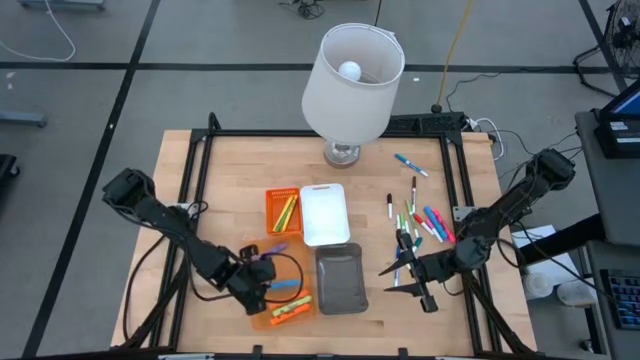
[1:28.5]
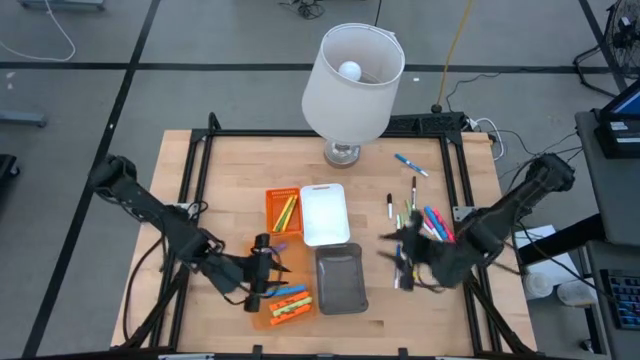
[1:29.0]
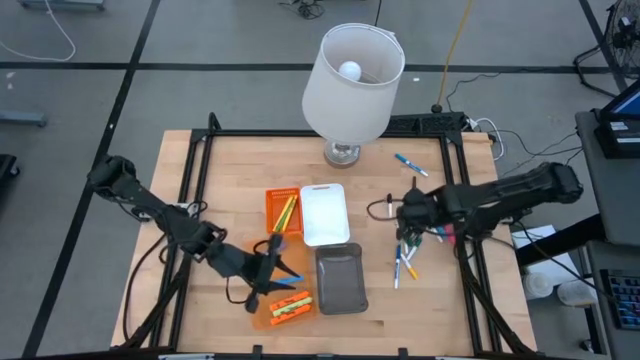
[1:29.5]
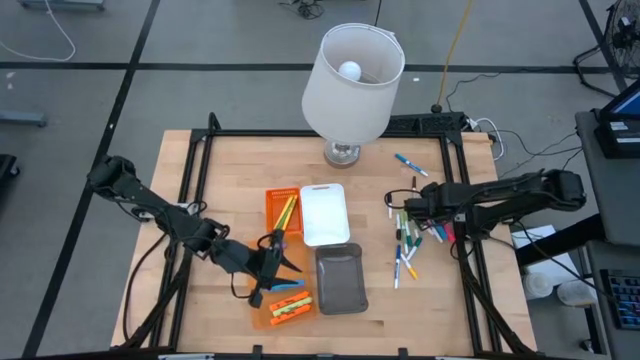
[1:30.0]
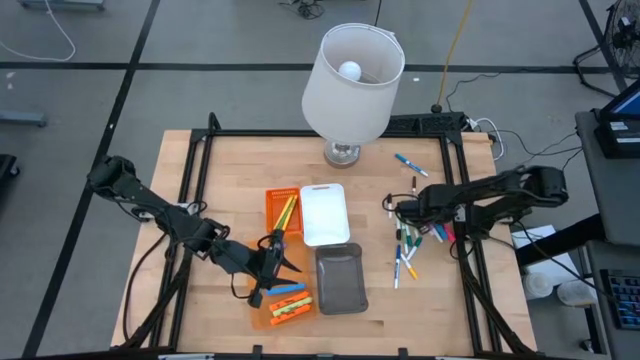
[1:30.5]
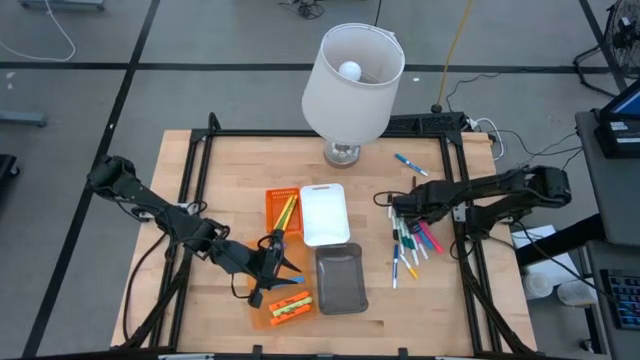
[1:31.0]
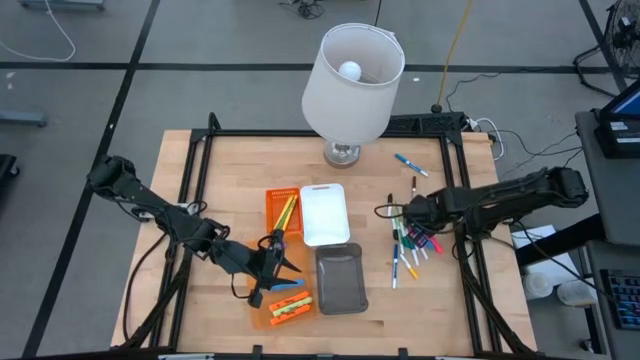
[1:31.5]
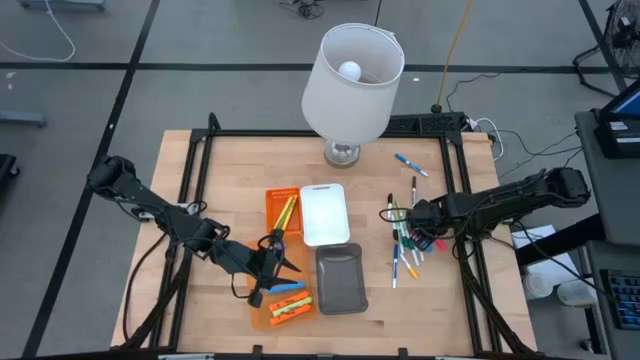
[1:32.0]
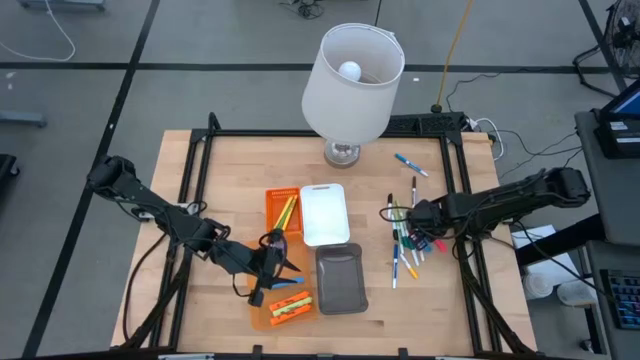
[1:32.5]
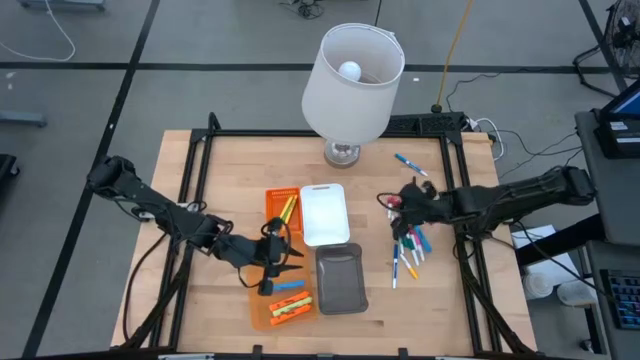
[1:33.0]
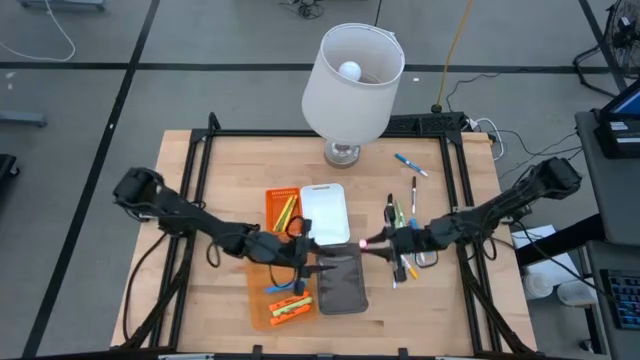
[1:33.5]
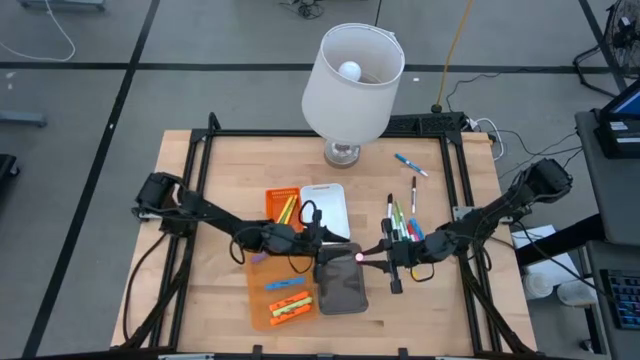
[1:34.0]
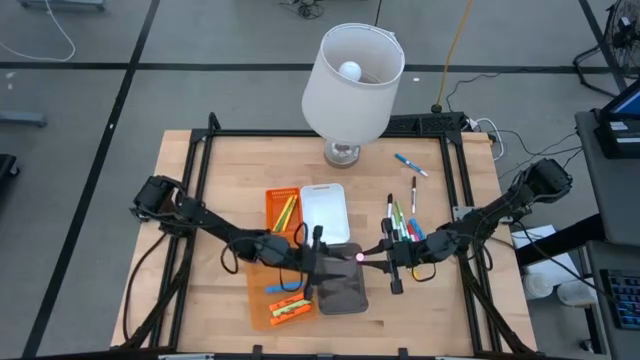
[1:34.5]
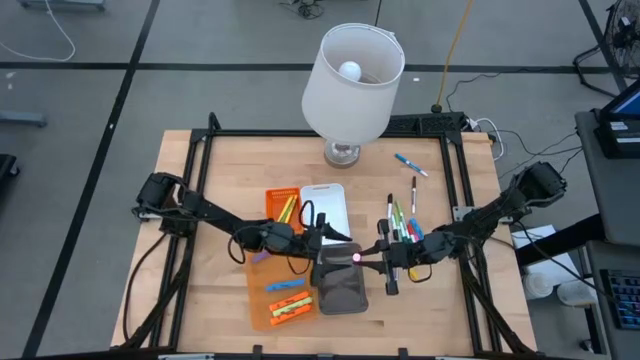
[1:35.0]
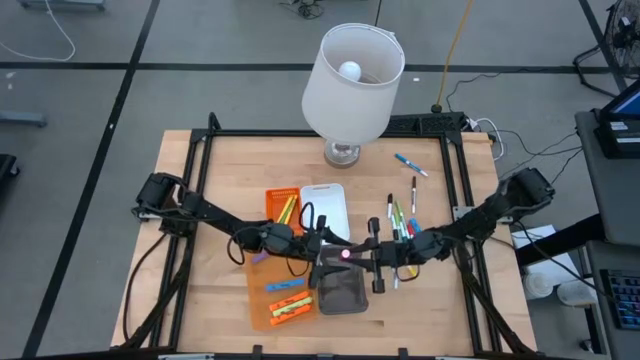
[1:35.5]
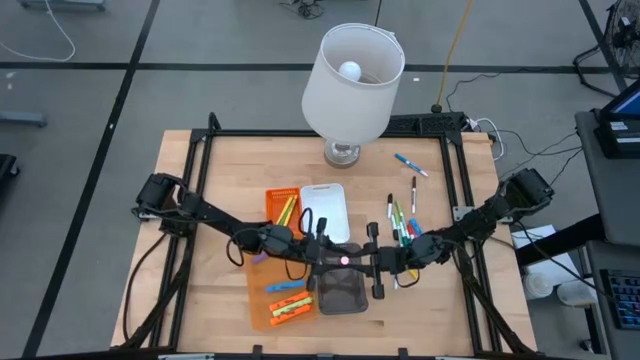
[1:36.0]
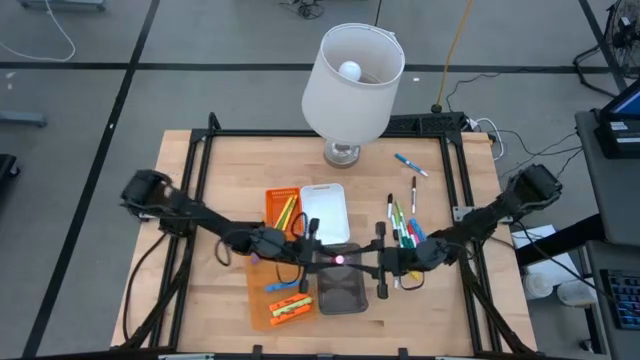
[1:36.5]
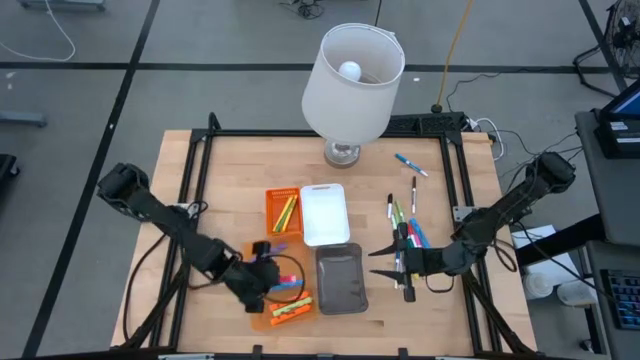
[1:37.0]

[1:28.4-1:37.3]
Task: Pick & Place Markers
Put the pink large highlighter pen into the transparent orange bin

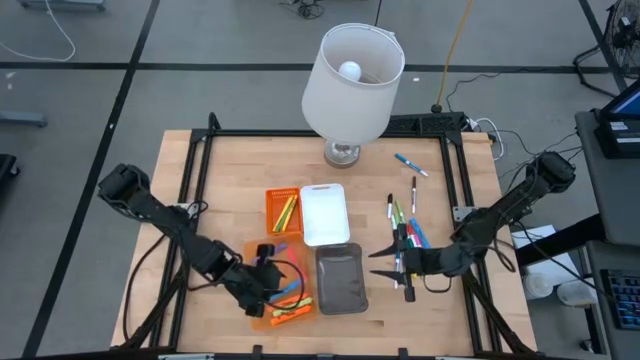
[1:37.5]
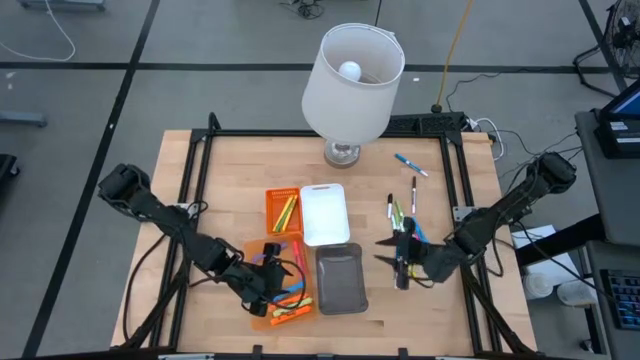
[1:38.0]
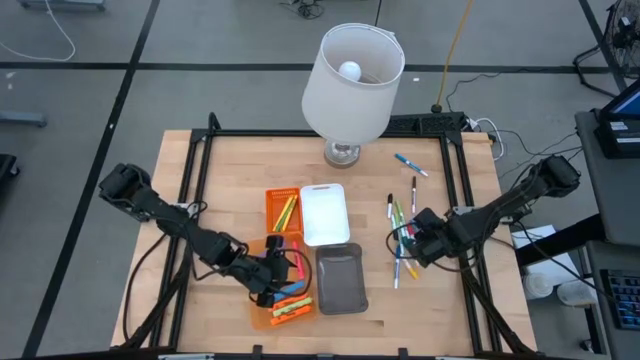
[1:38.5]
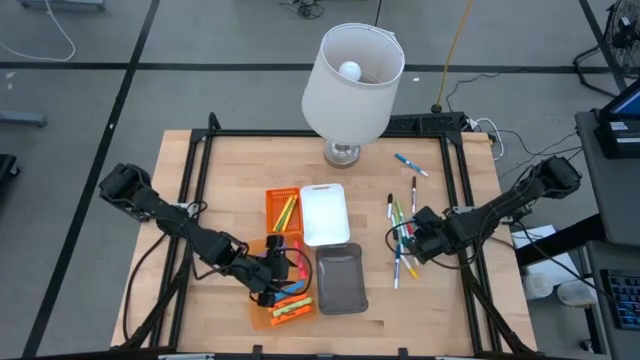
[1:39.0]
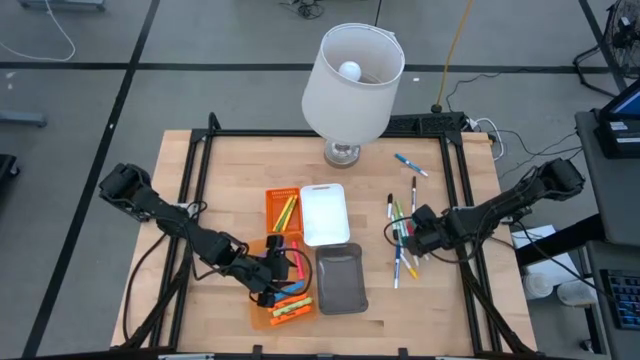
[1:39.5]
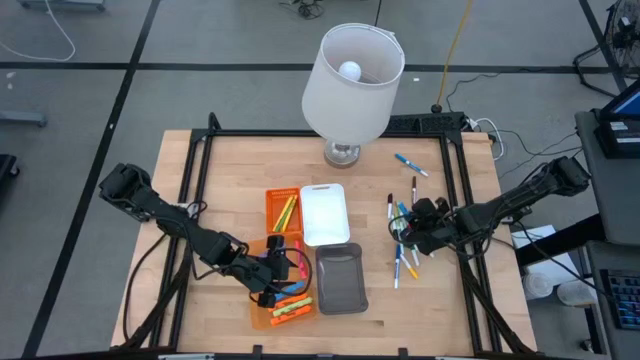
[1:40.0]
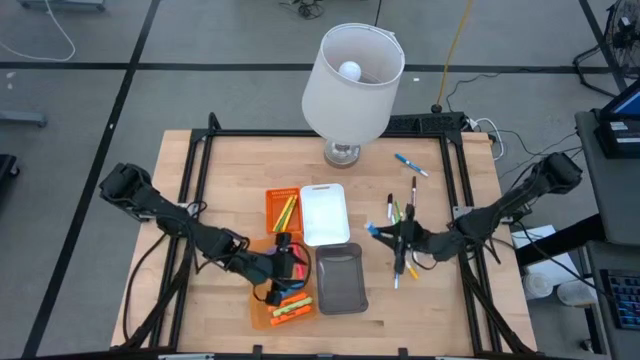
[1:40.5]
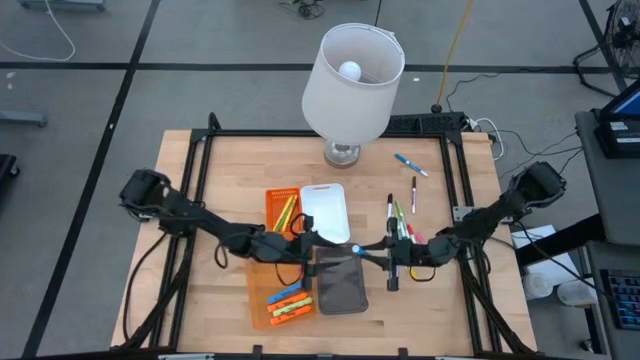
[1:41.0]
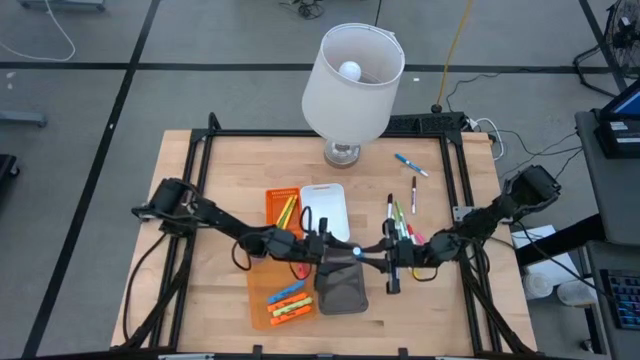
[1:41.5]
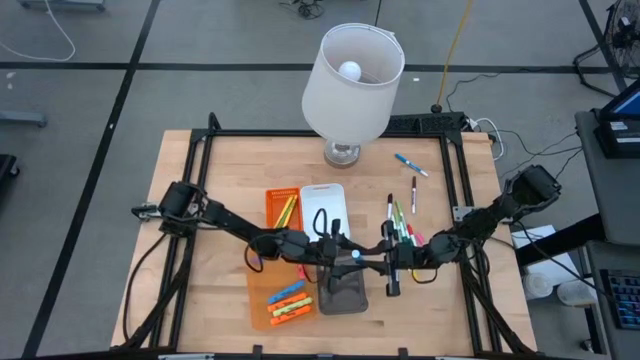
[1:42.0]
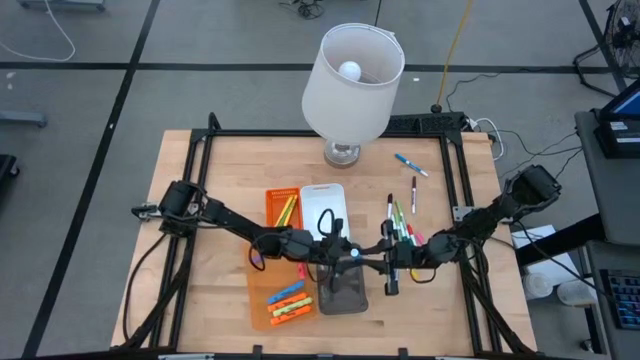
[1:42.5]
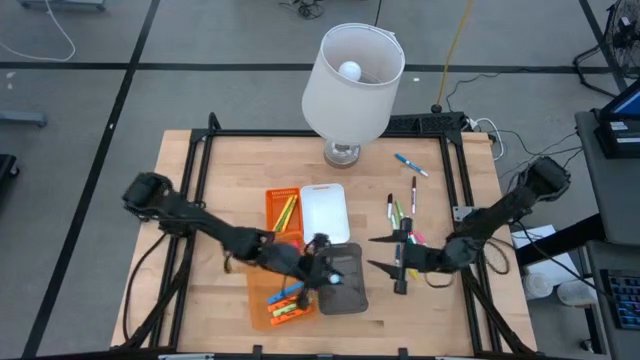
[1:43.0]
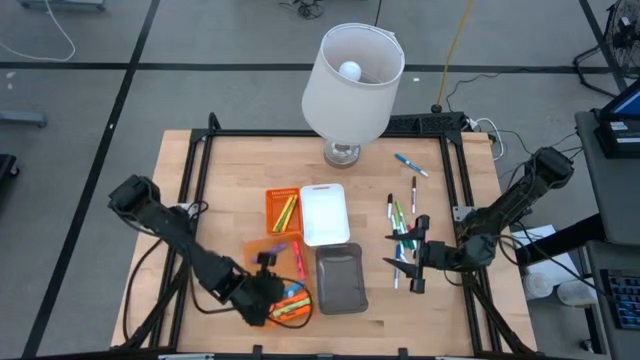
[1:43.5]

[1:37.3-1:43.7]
Put the blue large highlighter pen into the transparent orange bin

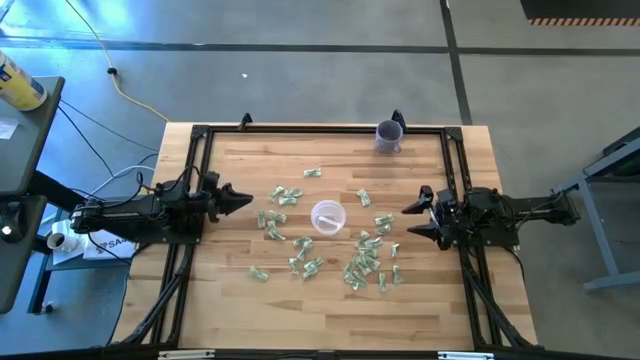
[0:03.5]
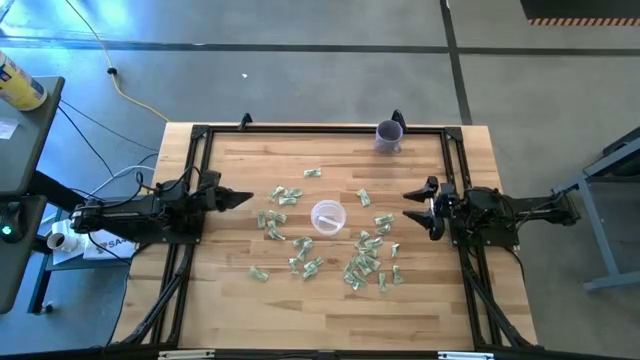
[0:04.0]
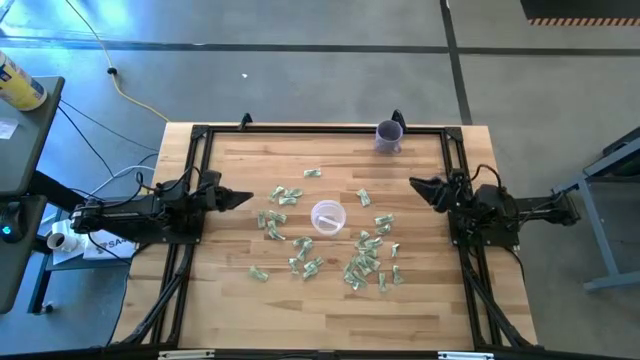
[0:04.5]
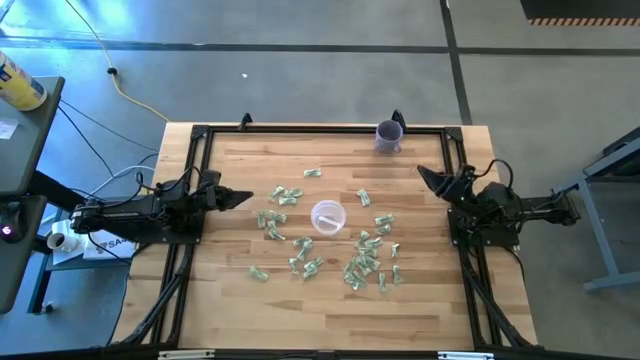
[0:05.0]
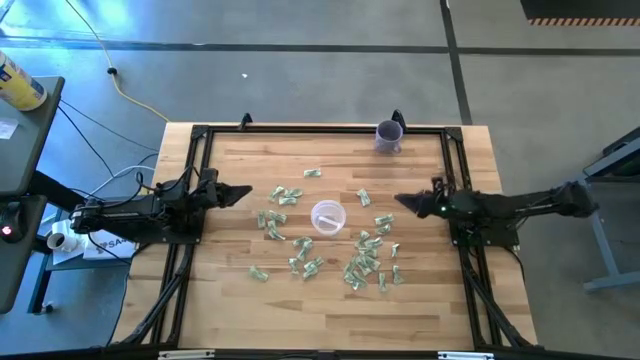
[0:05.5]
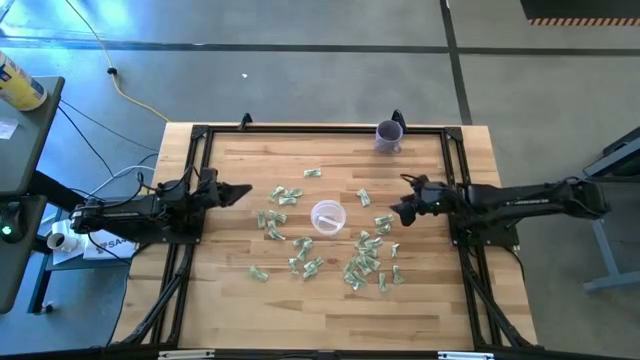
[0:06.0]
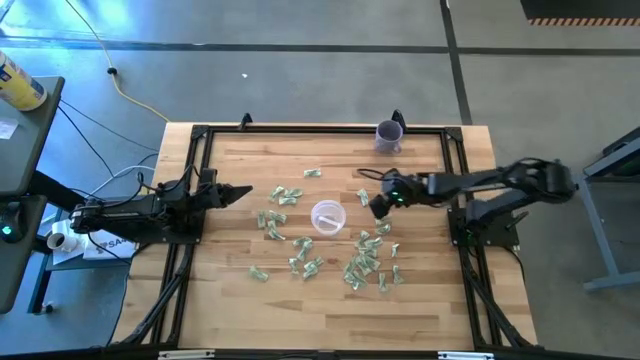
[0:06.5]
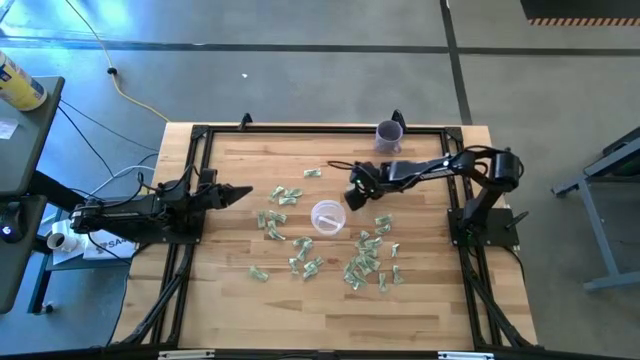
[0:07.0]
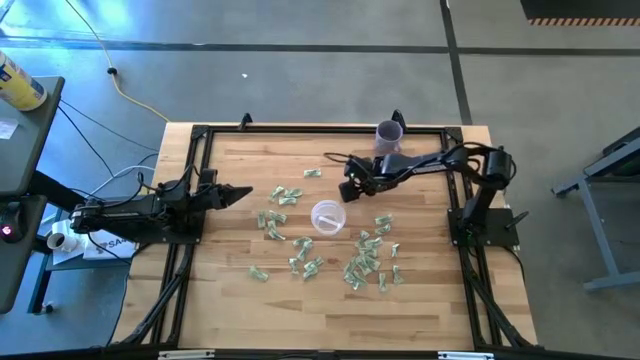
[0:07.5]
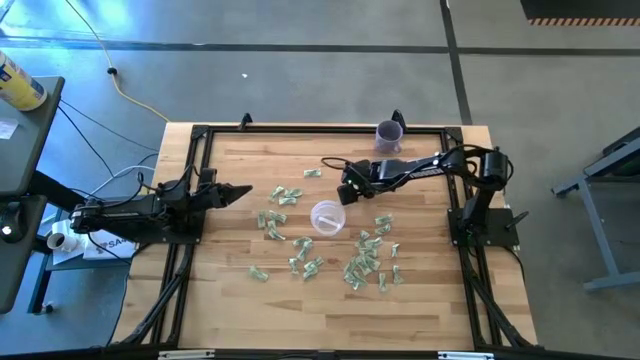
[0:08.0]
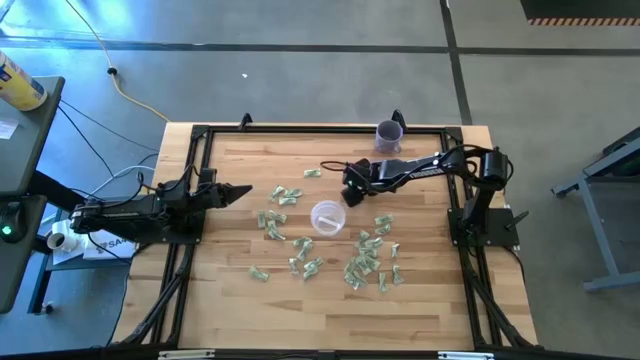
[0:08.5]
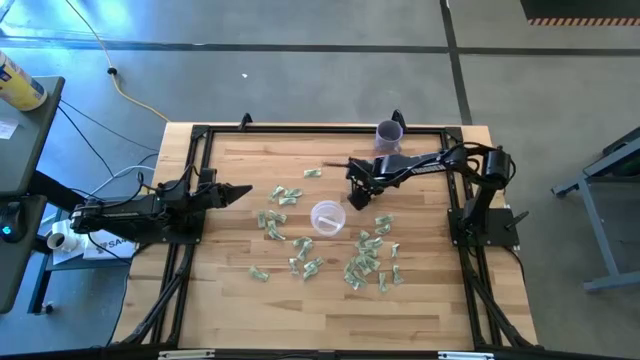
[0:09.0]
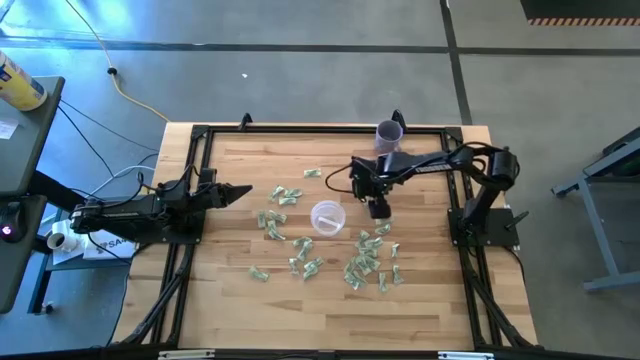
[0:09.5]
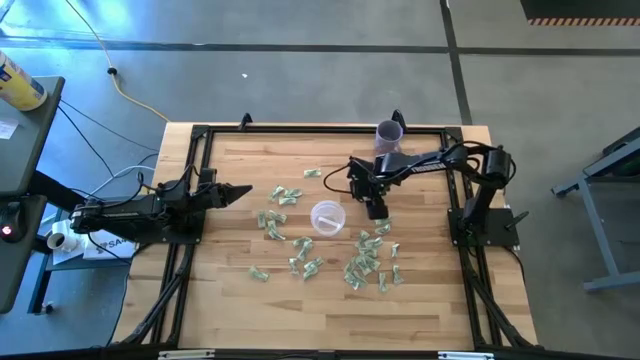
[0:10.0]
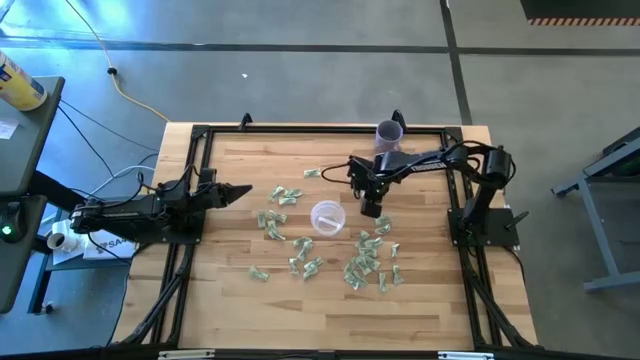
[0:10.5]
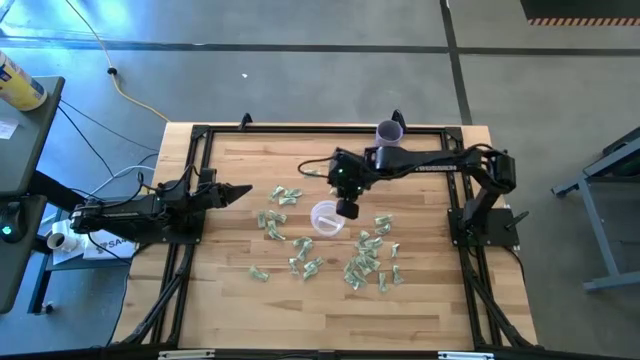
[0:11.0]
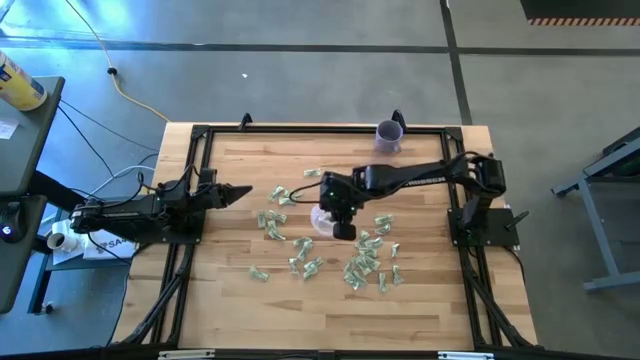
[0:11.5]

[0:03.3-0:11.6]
Task: Pick and place Stevia / Truvia into bins
Put the green stevia packet into the transparent bin
